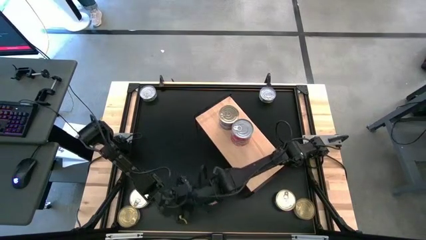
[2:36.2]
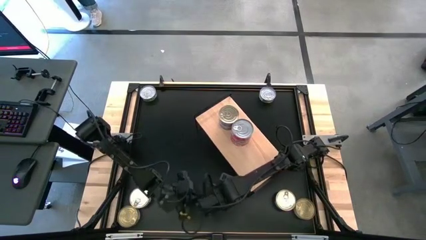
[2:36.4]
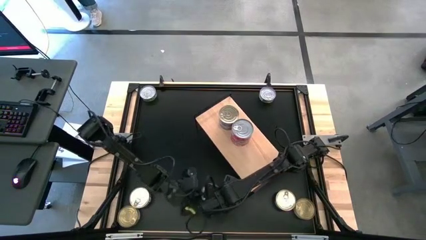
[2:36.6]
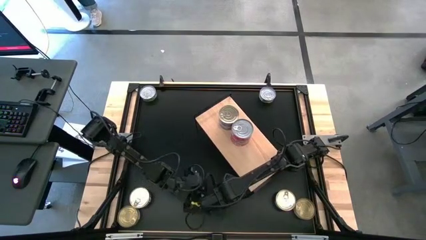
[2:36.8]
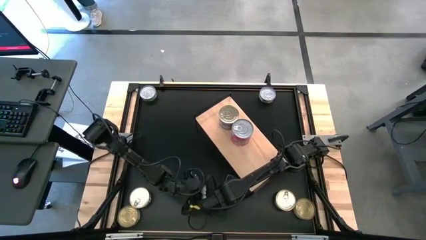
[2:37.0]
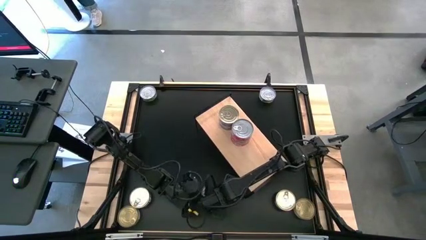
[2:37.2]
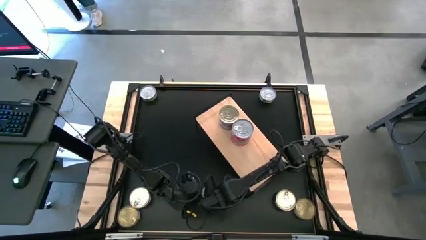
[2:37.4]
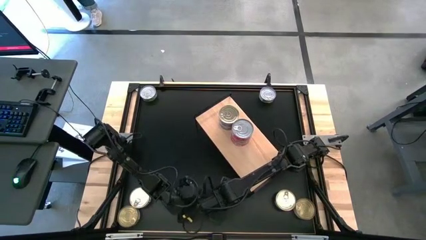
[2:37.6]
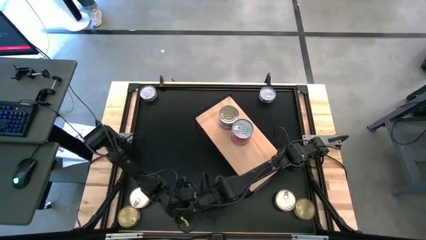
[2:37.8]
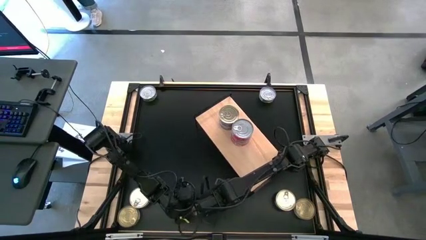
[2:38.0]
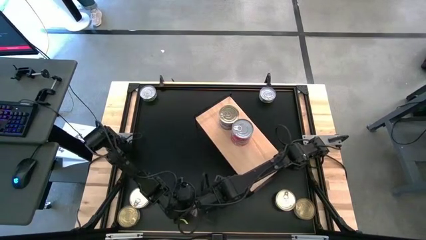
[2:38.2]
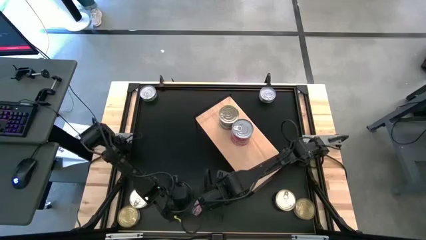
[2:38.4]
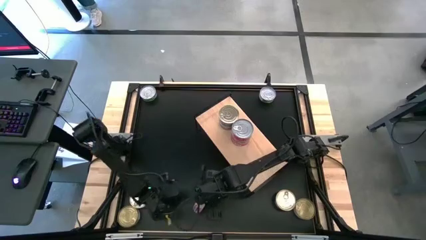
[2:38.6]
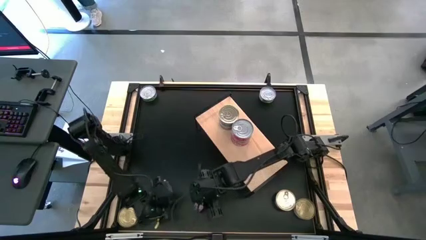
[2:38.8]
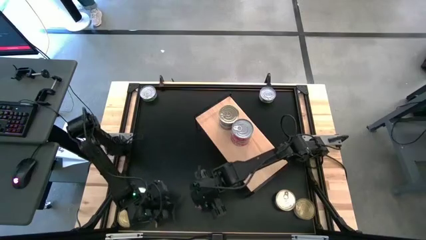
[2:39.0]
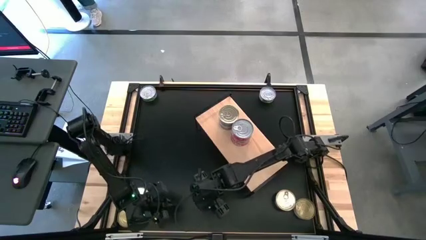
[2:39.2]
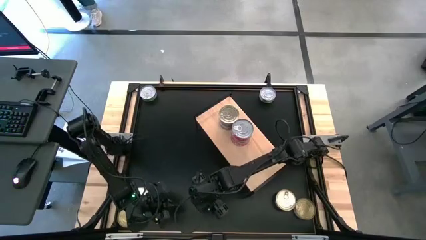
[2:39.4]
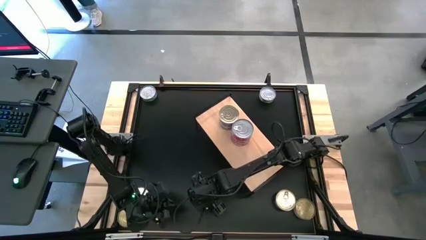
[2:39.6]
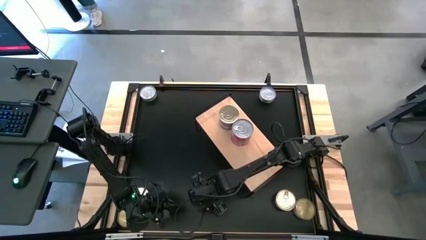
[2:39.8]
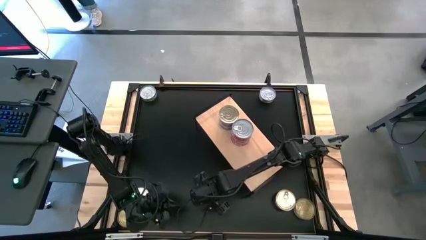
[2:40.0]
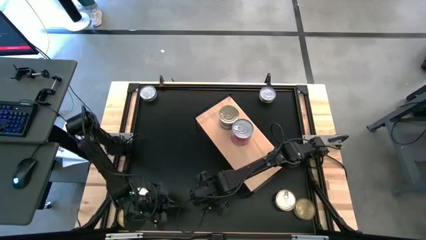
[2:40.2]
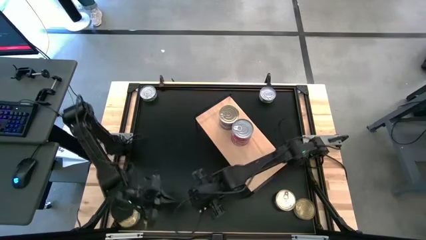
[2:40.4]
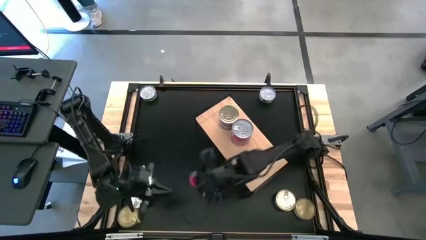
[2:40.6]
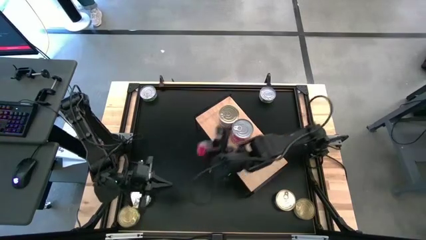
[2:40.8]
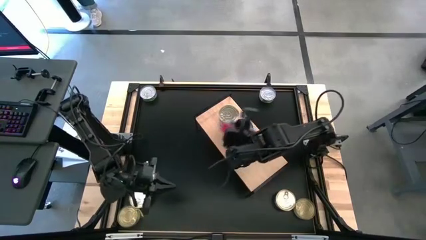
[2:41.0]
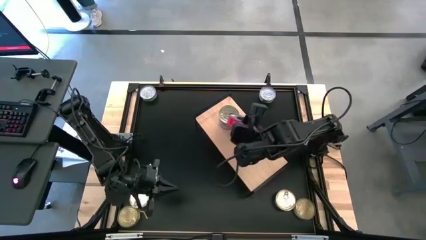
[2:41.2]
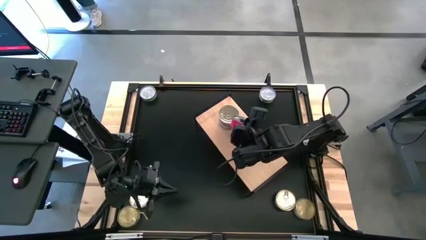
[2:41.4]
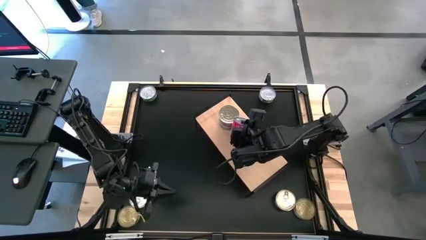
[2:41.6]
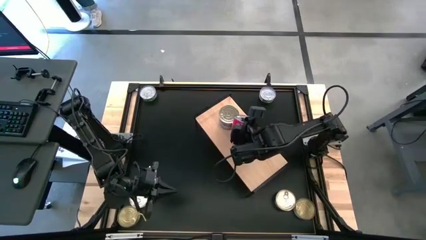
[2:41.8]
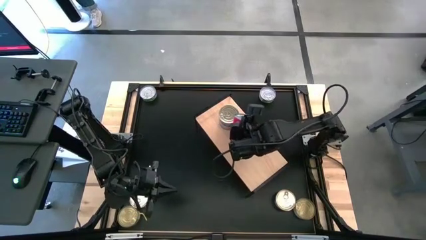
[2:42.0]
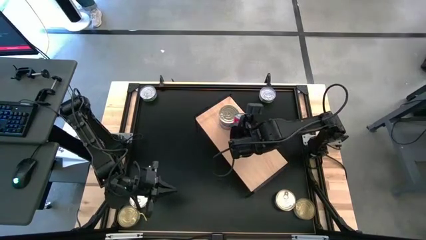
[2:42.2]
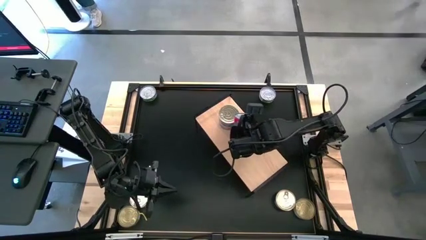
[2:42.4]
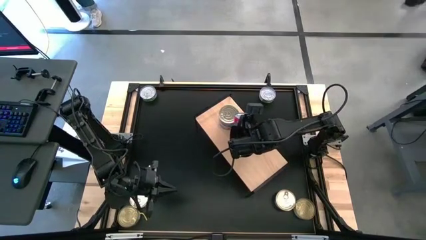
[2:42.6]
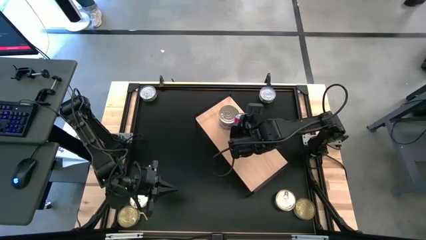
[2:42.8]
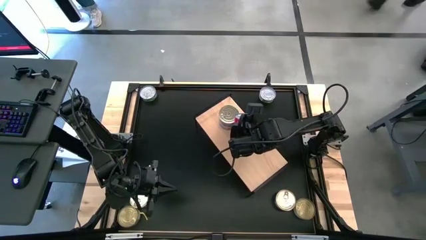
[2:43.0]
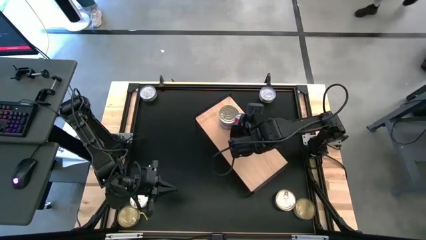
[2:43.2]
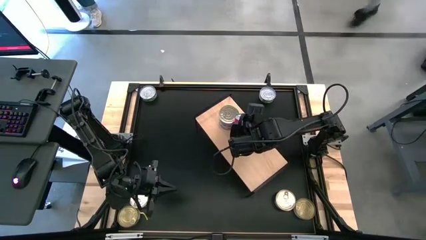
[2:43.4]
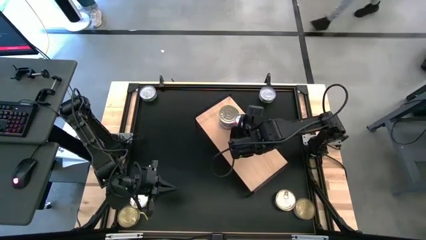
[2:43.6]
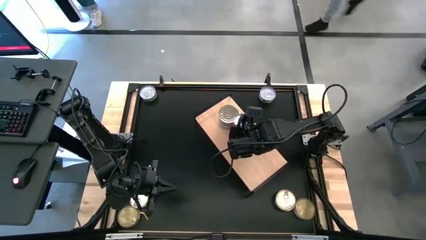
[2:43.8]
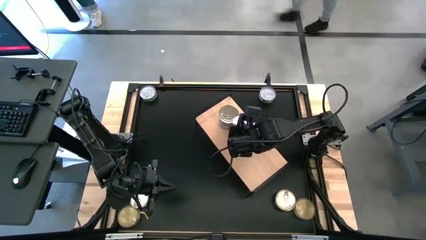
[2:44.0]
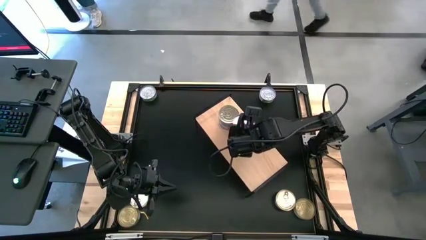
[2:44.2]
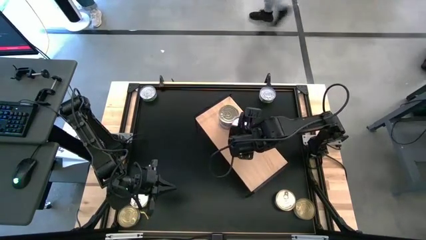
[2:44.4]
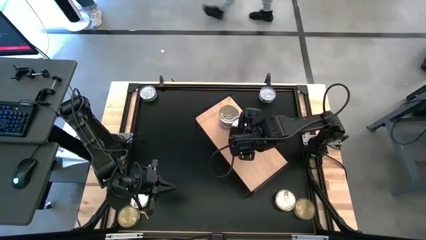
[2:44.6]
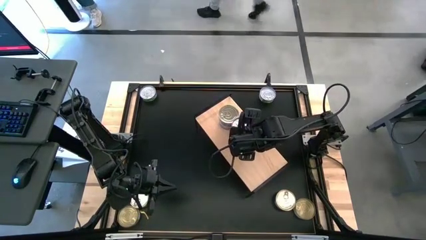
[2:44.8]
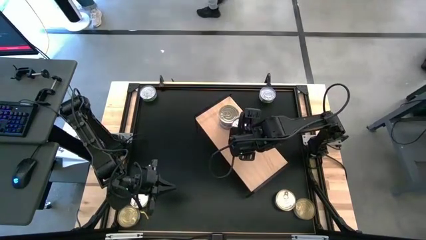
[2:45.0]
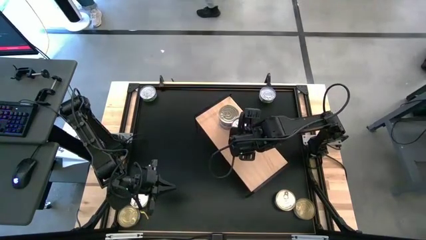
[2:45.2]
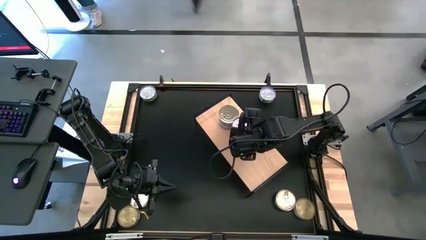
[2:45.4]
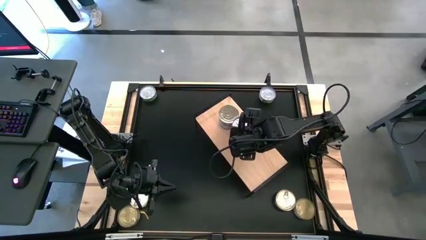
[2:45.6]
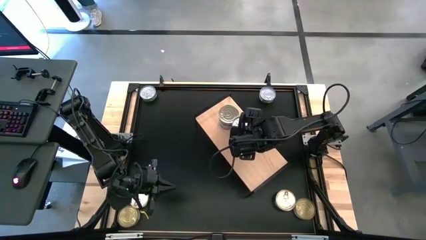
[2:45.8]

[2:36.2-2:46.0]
Task: Stack canned seafood by type on shelf
Stack the red tuna can on top of the red tuna can on the shelf

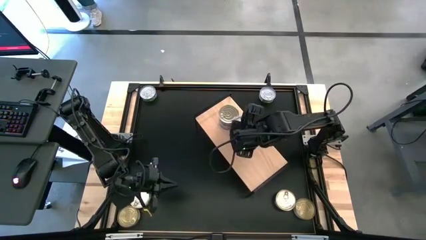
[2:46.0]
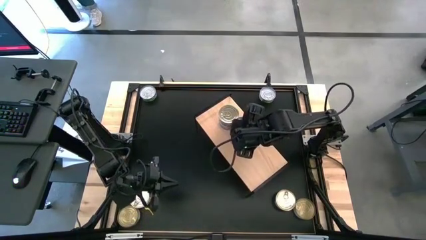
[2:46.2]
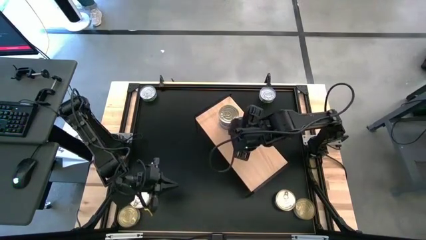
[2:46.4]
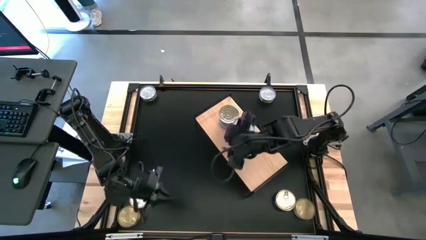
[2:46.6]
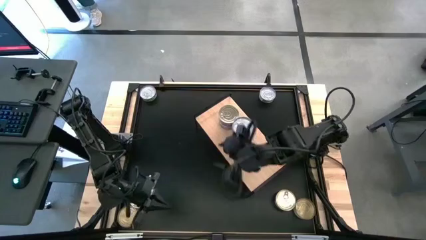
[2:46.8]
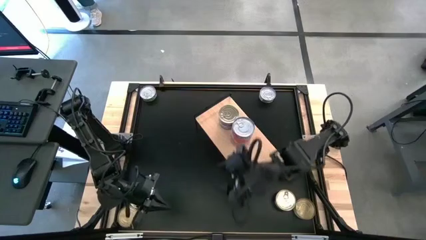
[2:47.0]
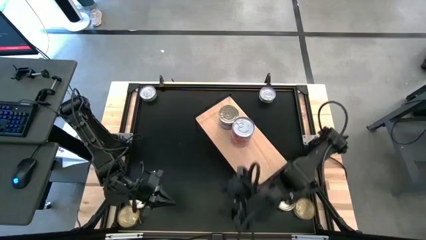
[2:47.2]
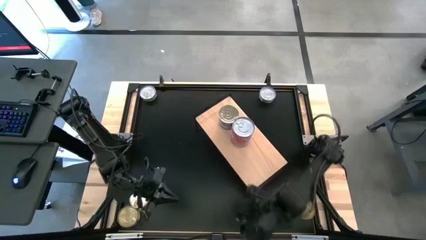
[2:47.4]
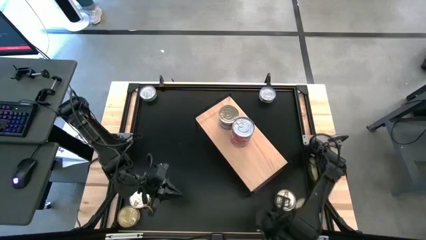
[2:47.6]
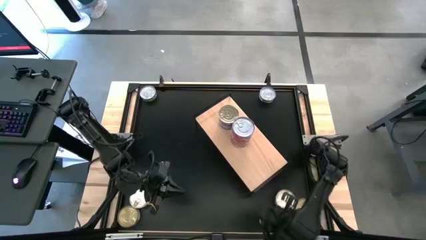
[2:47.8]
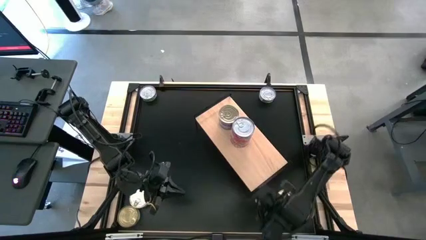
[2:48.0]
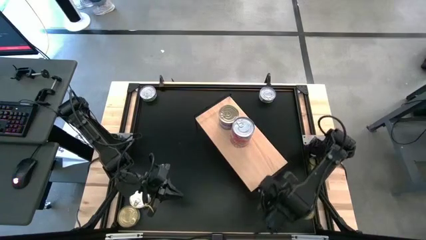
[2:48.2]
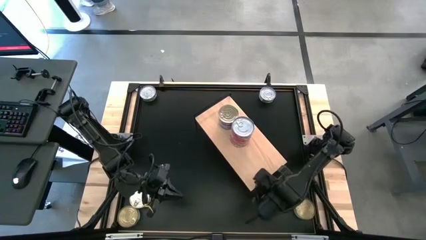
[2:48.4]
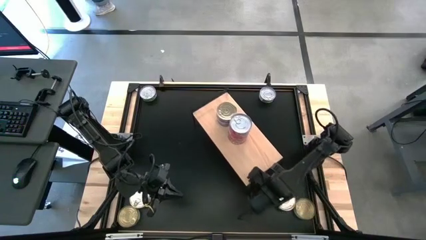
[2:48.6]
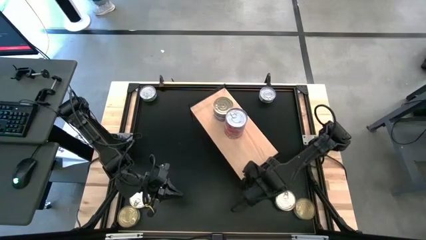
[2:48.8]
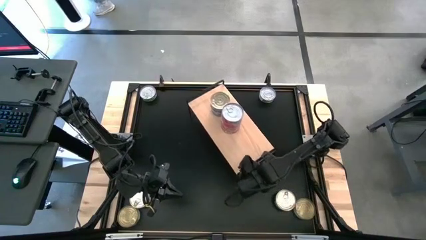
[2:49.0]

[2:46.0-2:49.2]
Adjust the shelf on the table
